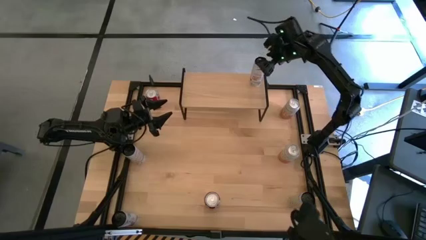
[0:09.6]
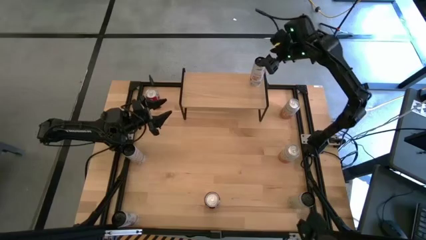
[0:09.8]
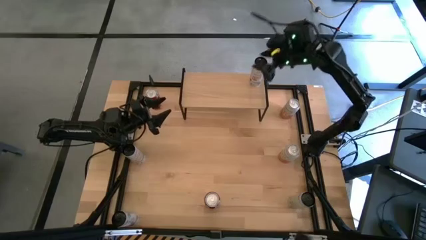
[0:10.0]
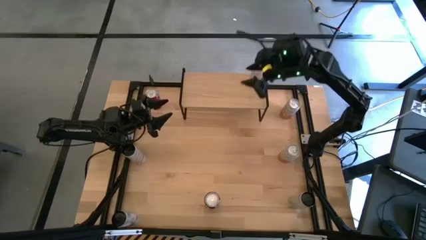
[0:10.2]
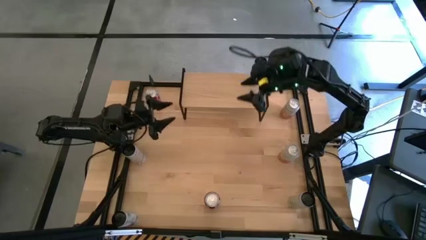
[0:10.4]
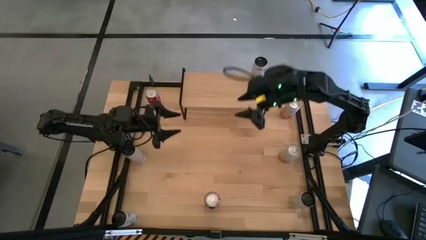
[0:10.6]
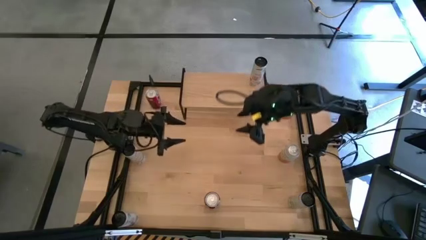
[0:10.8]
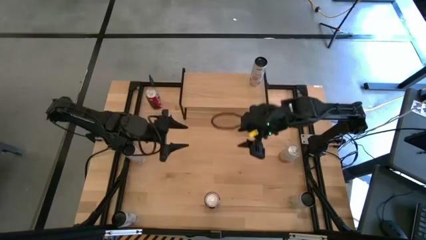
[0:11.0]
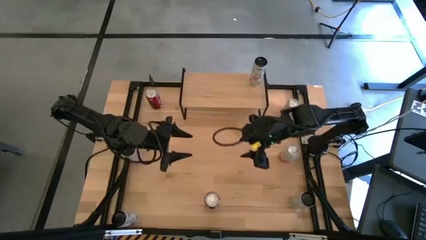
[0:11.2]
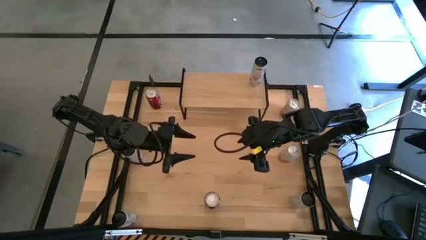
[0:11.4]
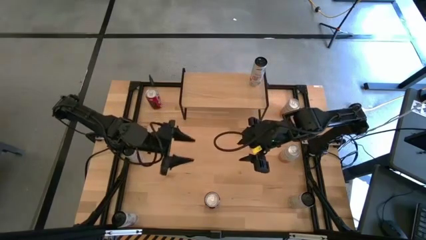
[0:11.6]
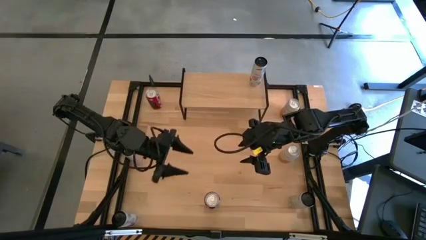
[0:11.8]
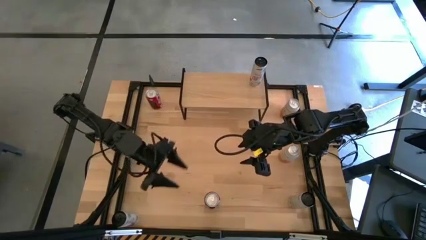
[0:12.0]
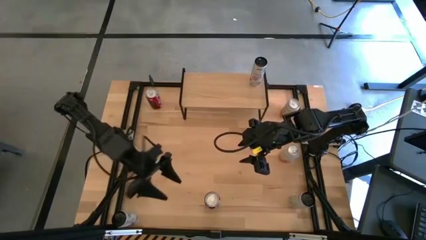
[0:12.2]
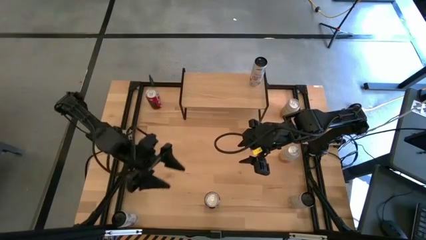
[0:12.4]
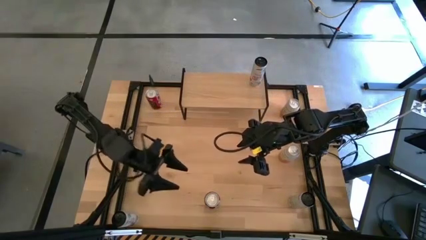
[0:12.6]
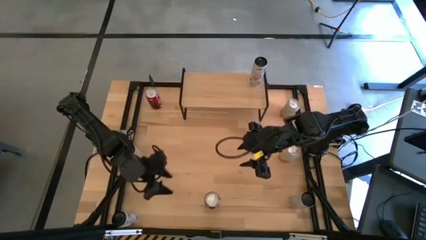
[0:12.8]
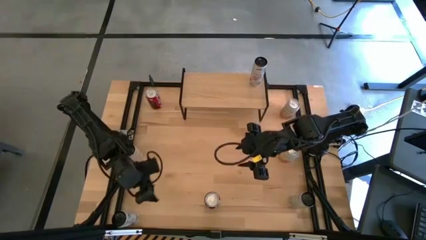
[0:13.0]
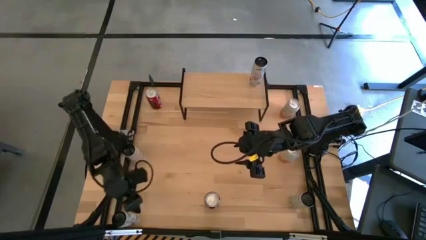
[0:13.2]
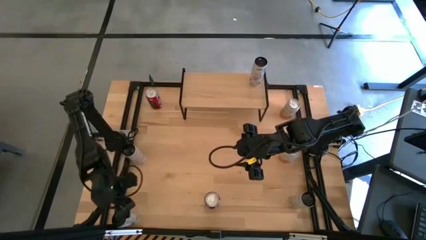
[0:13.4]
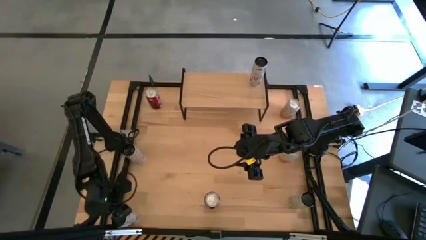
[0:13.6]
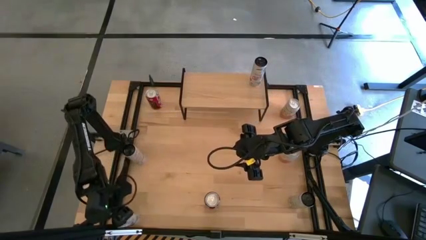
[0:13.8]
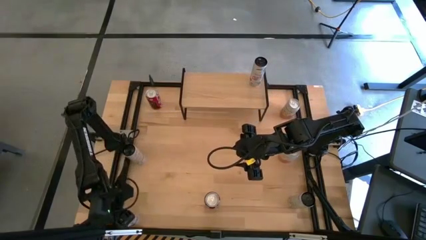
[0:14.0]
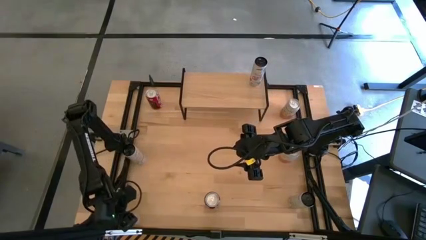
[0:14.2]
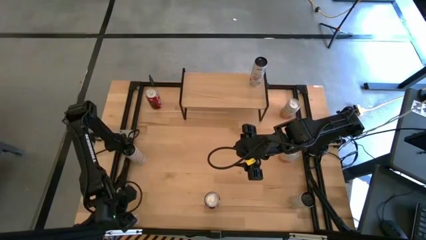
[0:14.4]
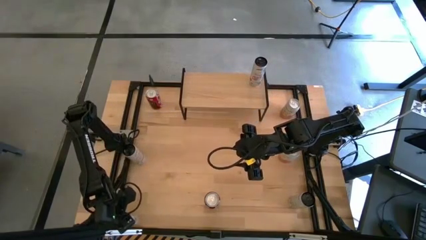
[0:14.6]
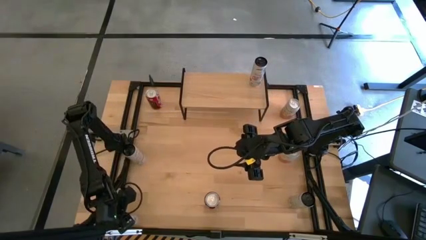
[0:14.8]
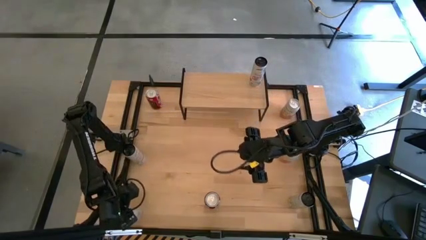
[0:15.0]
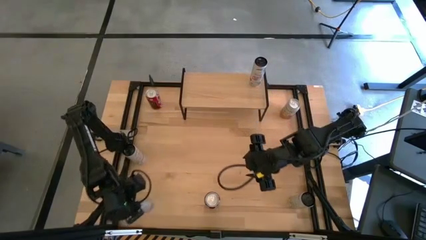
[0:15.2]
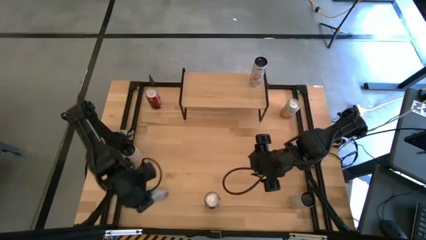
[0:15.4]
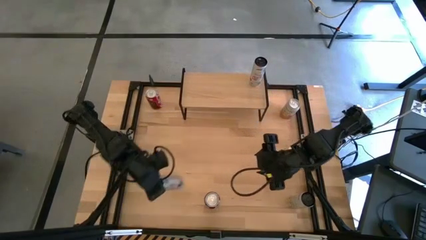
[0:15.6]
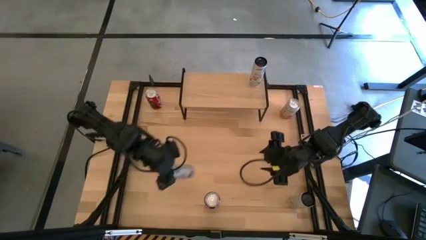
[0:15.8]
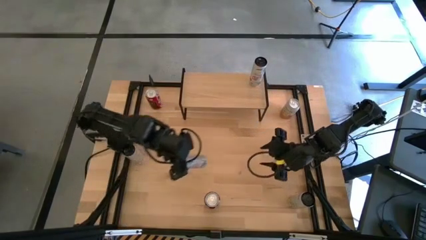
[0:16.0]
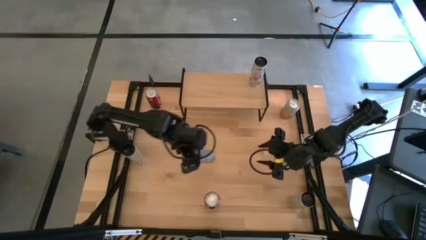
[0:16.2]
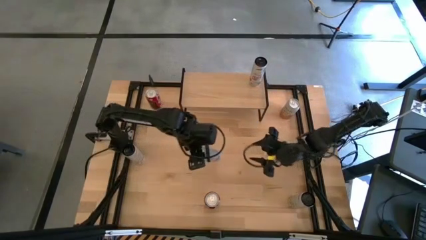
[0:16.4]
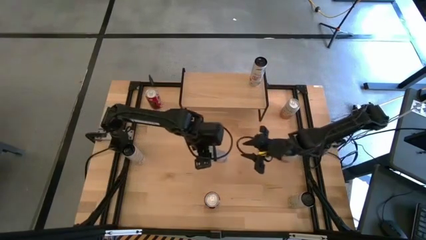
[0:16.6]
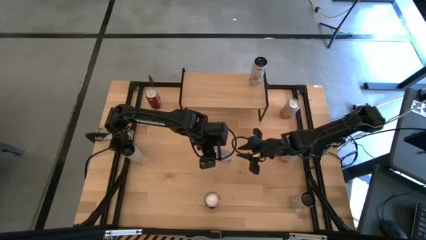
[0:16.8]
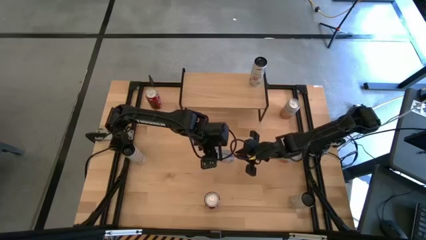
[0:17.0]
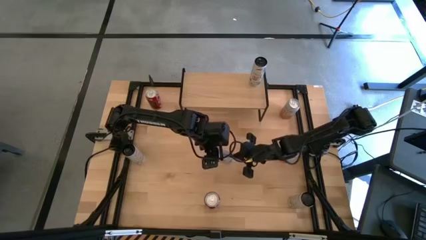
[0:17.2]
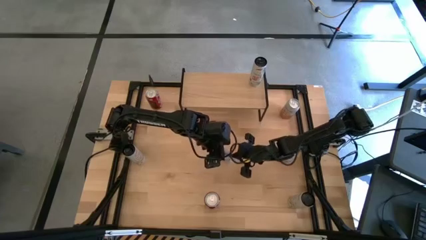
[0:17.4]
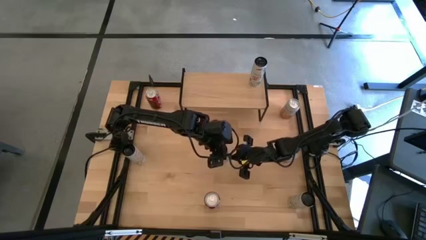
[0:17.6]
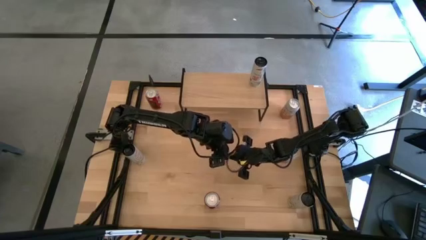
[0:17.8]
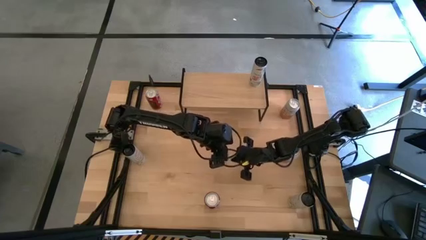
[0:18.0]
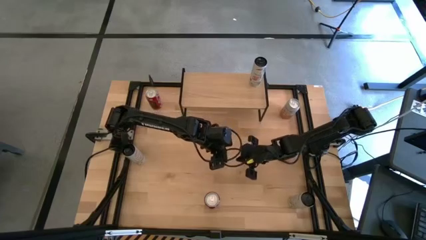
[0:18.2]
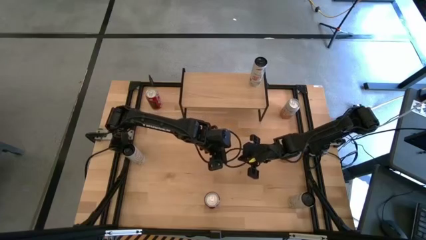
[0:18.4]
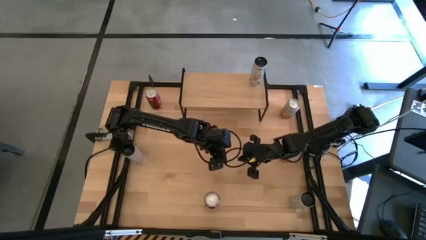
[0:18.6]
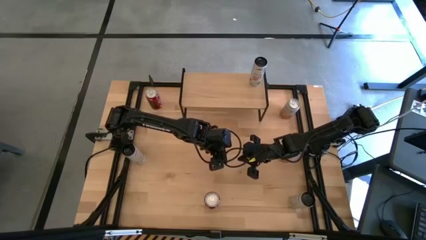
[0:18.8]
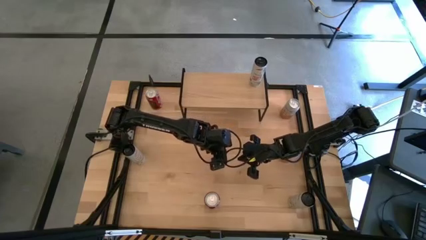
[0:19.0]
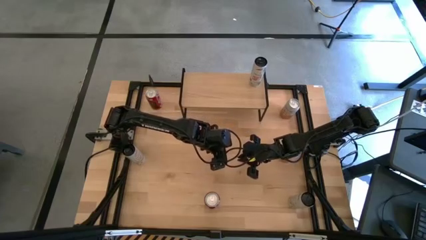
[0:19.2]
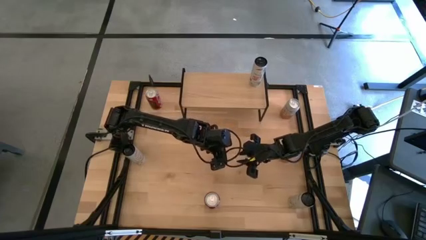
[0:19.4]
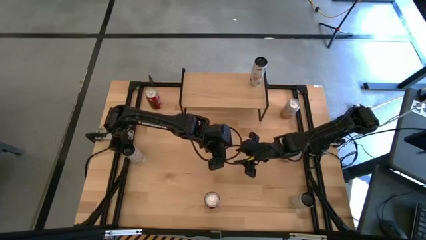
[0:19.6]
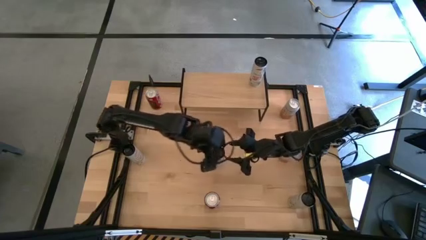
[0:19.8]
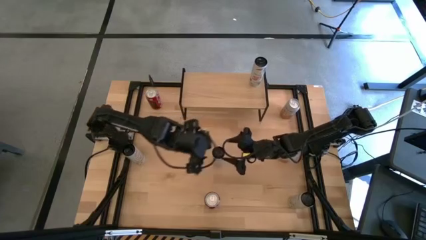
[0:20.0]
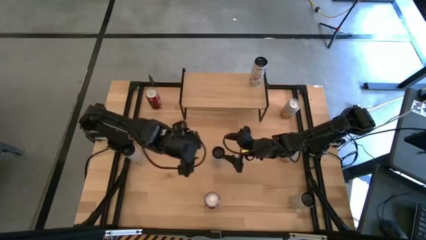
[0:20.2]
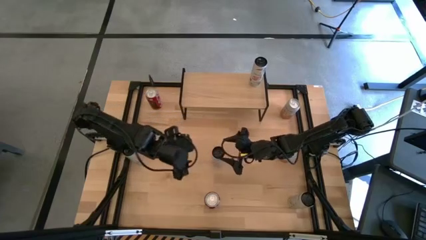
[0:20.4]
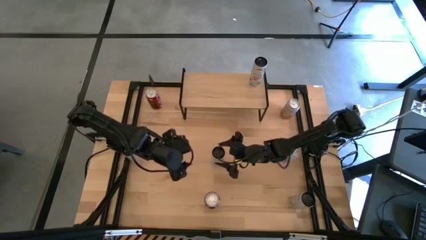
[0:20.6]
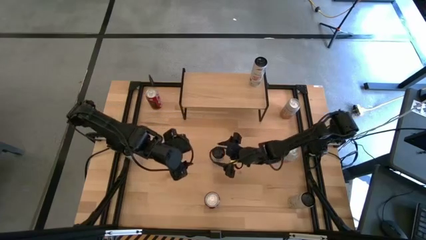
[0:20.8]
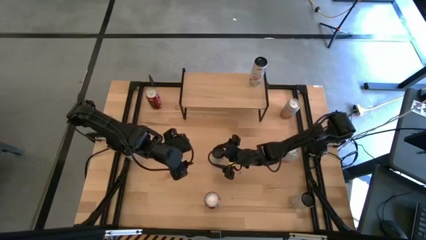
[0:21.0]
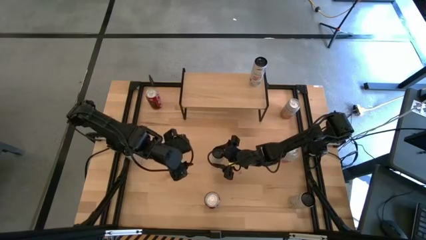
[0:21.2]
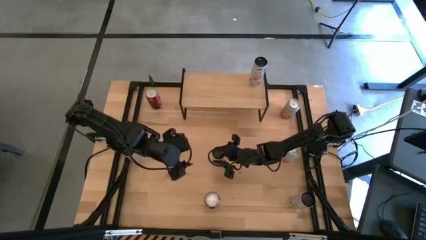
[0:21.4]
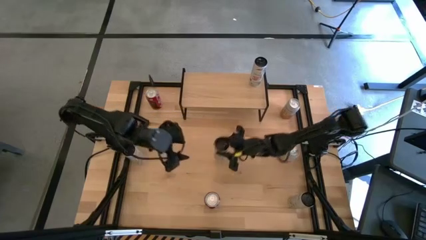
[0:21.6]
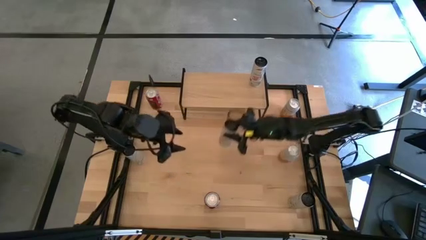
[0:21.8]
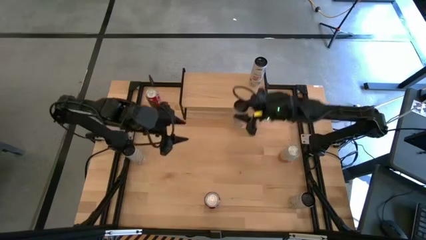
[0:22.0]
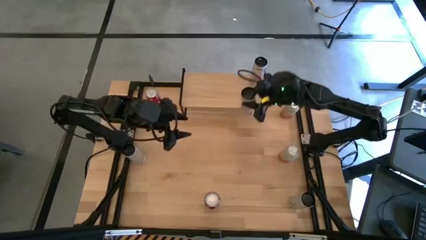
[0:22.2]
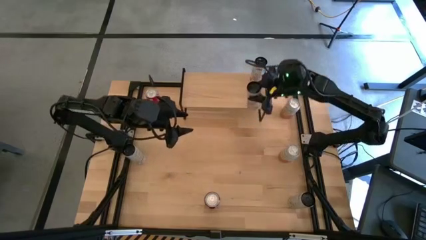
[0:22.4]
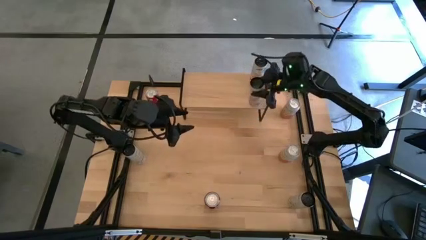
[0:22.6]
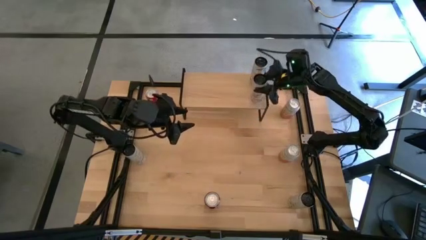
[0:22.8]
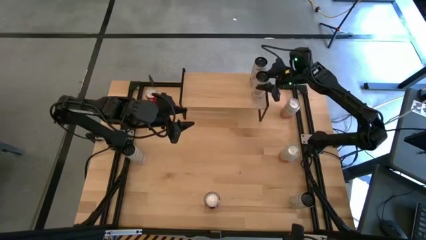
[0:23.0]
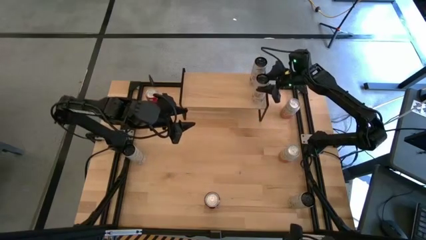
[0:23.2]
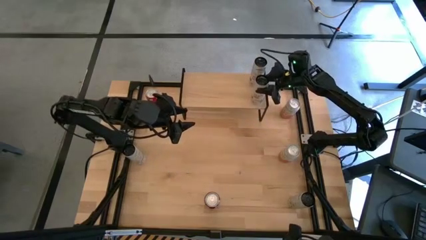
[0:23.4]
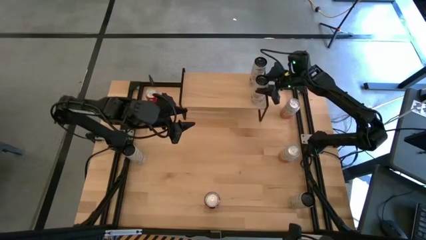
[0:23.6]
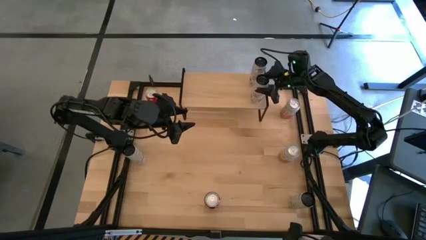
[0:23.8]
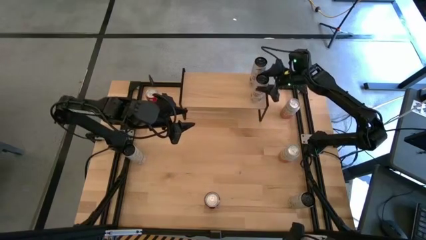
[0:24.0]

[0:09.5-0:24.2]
Task: Place canned beverage on shelf
Put the white-pink soda can on the shelf aligned with the other white-pink soda can

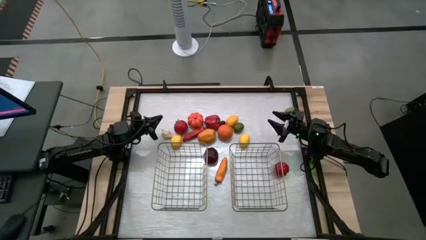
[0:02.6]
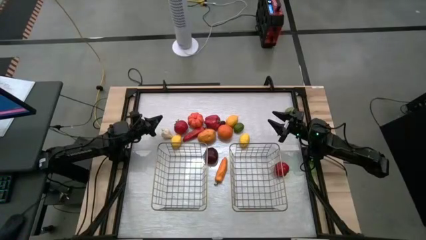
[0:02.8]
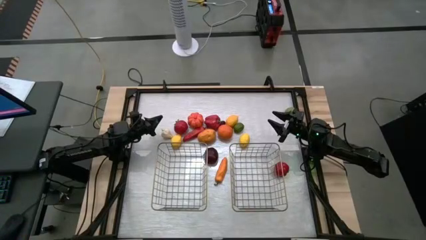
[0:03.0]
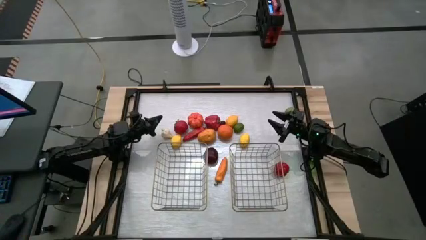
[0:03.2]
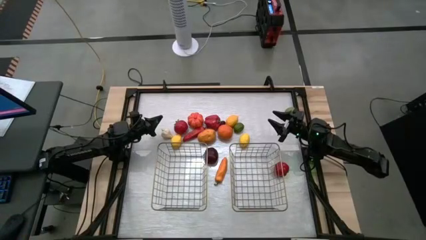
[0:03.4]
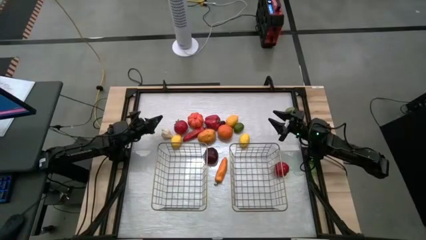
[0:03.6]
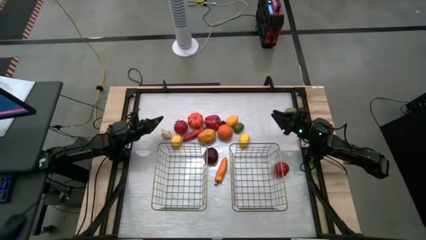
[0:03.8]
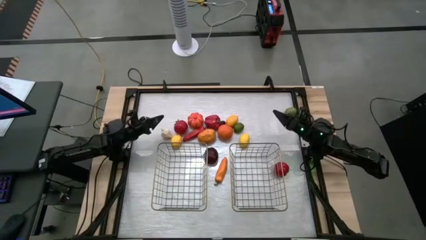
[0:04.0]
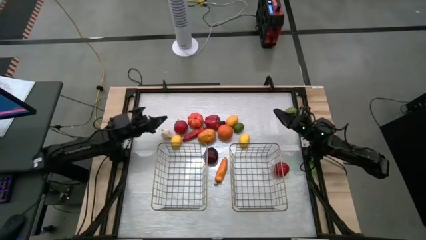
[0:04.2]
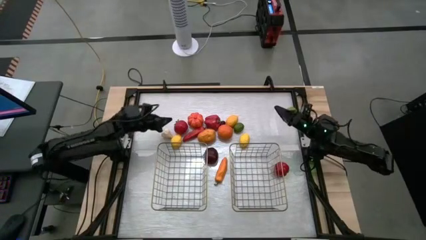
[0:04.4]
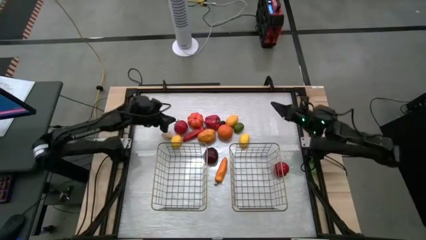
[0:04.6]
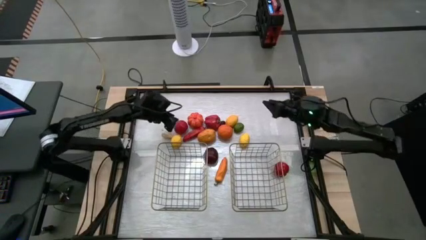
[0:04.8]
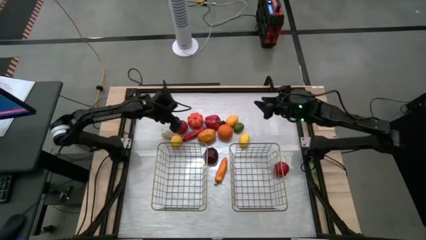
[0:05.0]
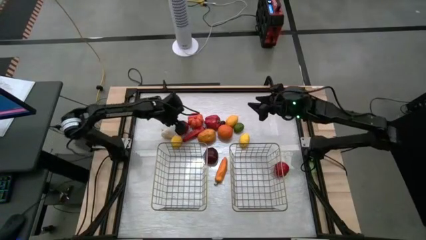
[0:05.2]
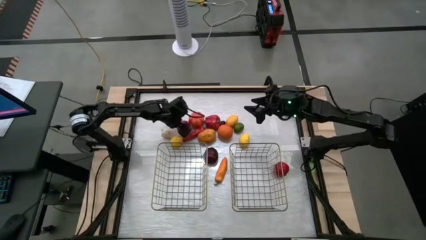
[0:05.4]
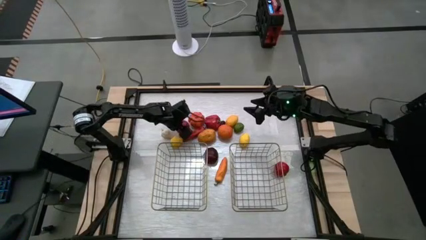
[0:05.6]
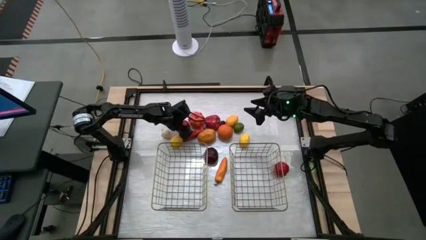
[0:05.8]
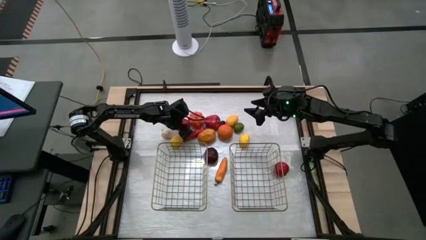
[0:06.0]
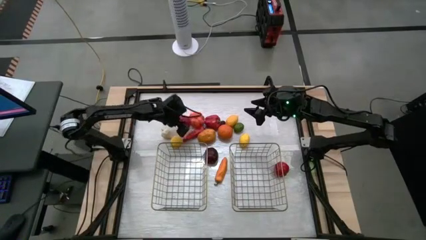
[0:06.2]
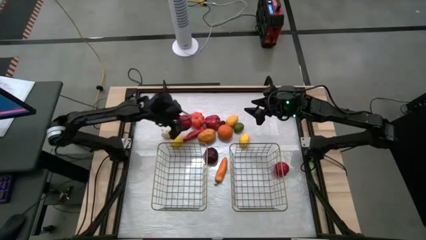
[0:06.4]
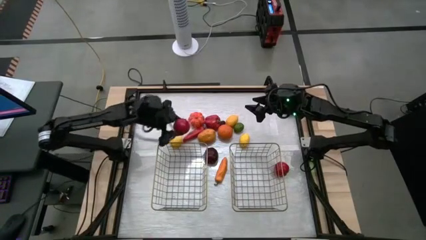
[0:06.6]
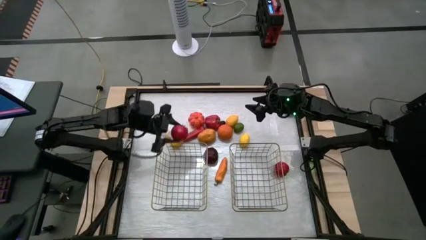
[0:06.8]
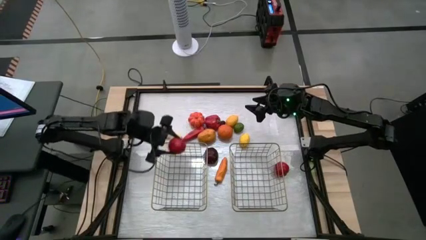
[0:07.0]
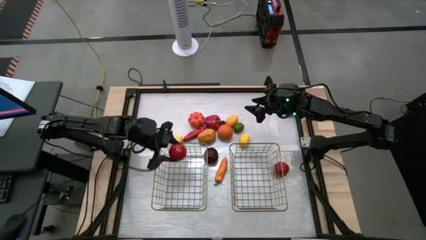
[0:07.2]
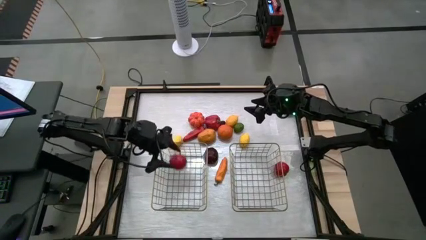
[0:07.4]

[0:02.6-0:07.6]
Task: Sort produce into baskets
Put the left tomato into the left brown wire basket
